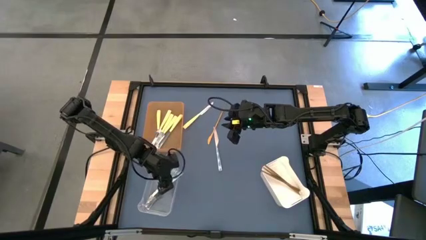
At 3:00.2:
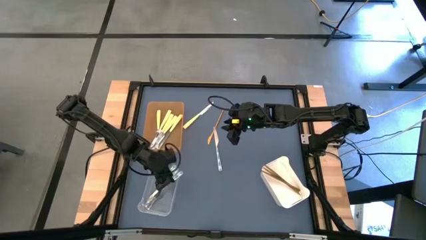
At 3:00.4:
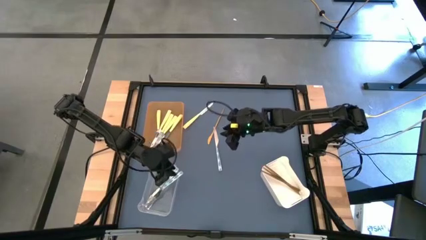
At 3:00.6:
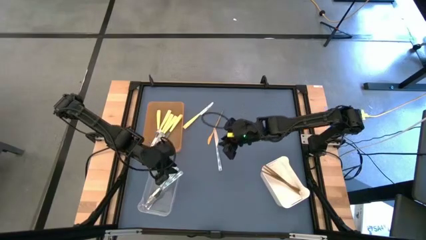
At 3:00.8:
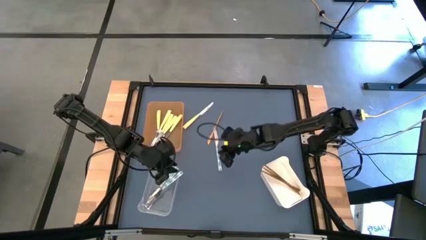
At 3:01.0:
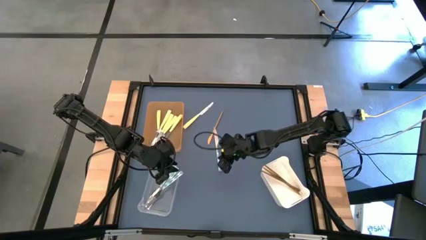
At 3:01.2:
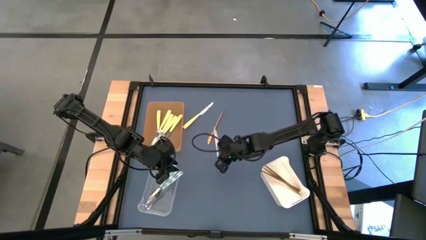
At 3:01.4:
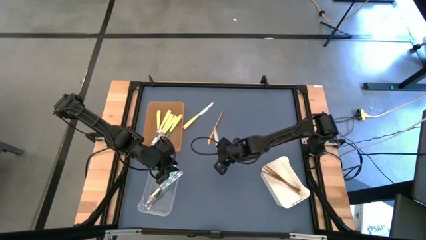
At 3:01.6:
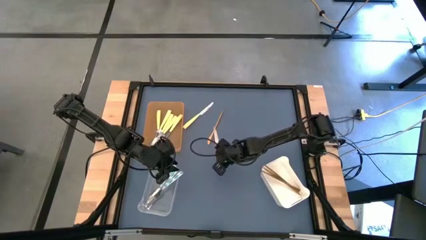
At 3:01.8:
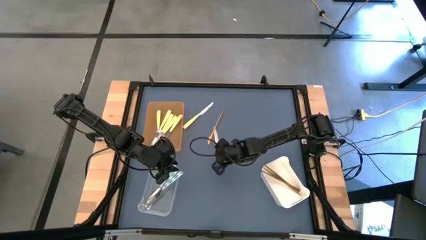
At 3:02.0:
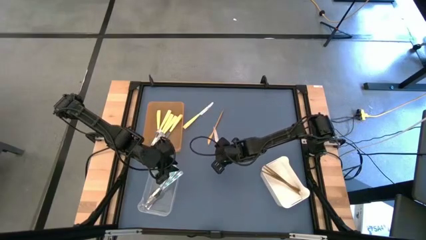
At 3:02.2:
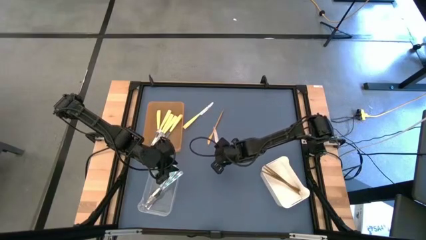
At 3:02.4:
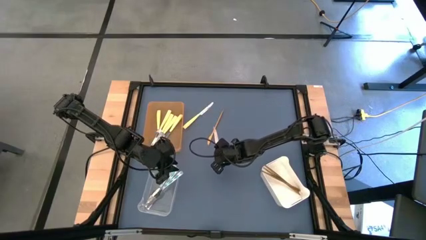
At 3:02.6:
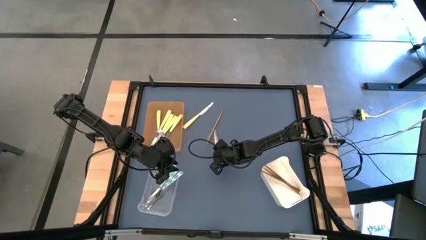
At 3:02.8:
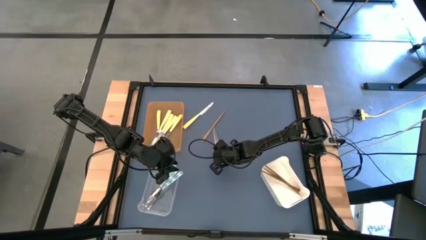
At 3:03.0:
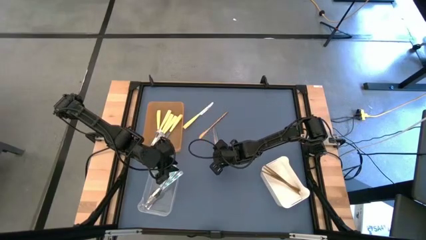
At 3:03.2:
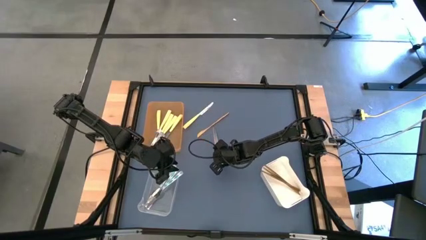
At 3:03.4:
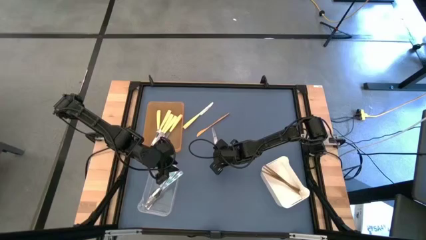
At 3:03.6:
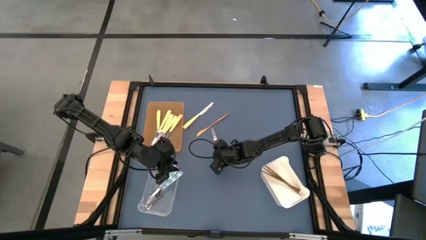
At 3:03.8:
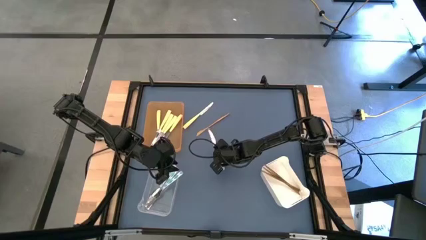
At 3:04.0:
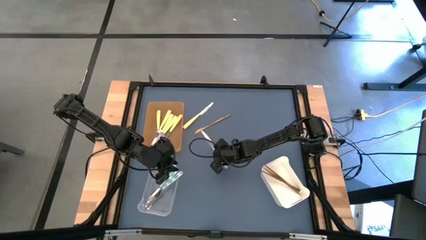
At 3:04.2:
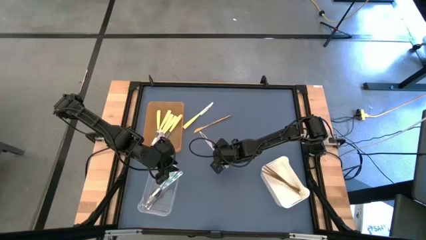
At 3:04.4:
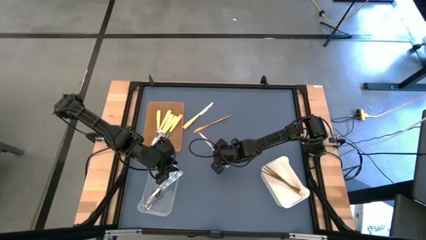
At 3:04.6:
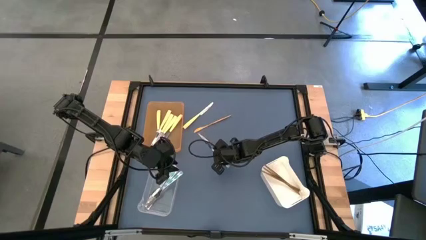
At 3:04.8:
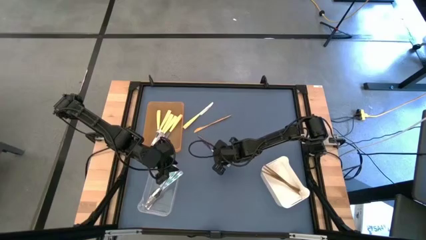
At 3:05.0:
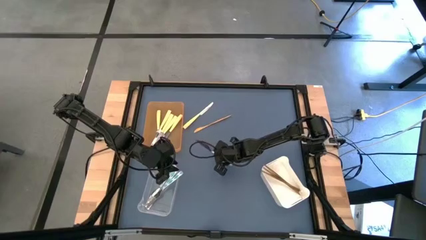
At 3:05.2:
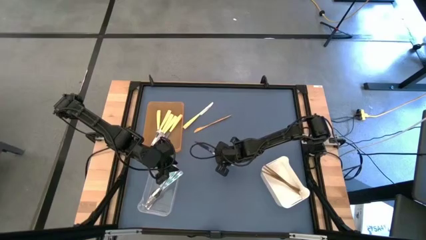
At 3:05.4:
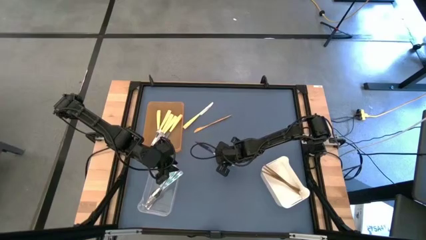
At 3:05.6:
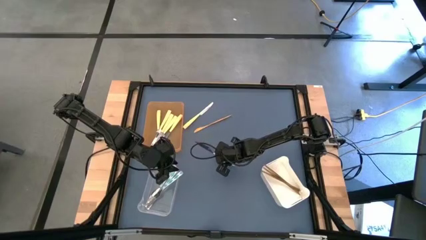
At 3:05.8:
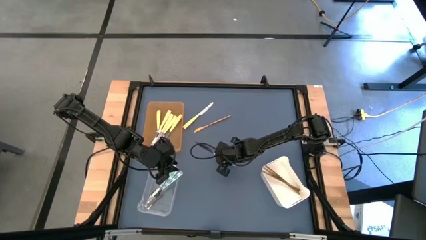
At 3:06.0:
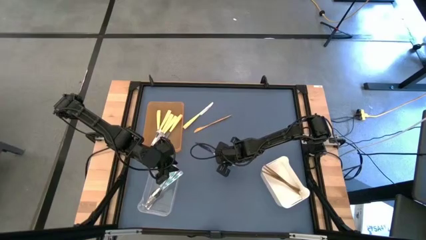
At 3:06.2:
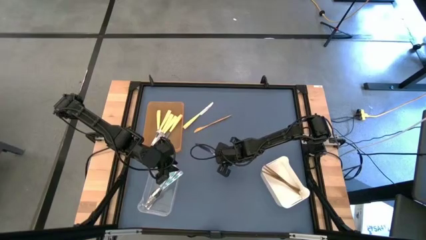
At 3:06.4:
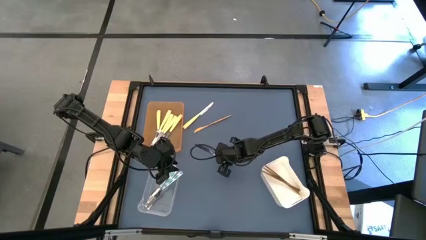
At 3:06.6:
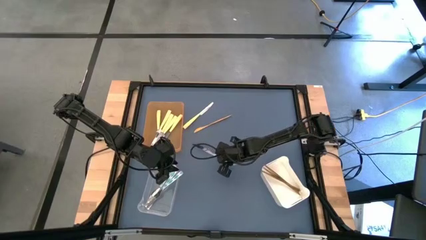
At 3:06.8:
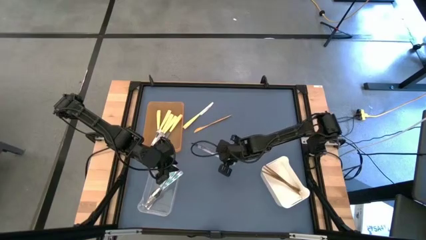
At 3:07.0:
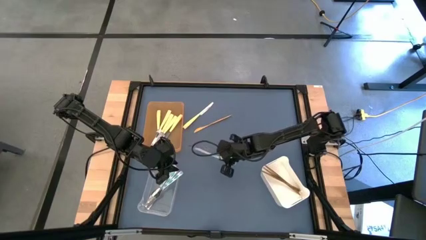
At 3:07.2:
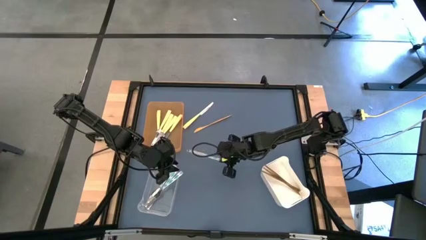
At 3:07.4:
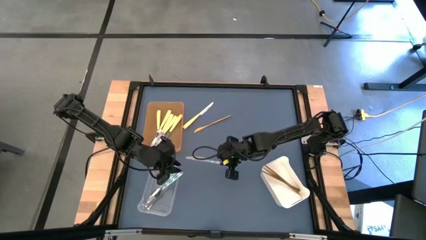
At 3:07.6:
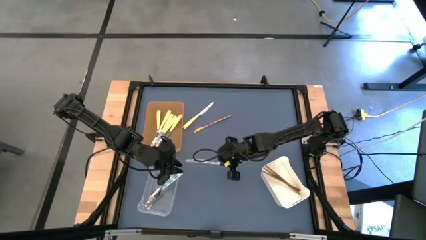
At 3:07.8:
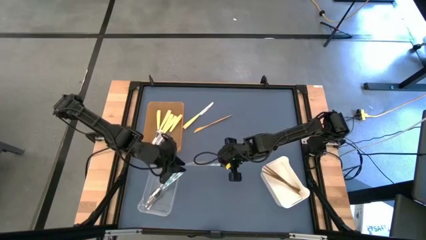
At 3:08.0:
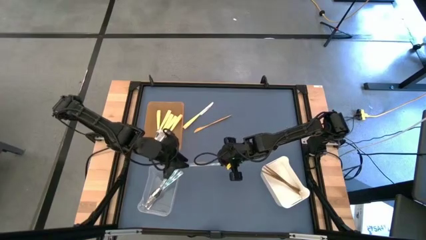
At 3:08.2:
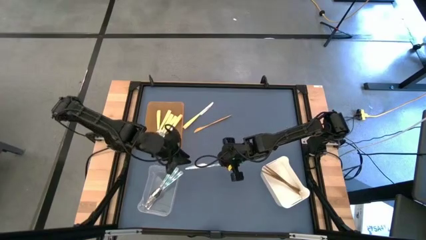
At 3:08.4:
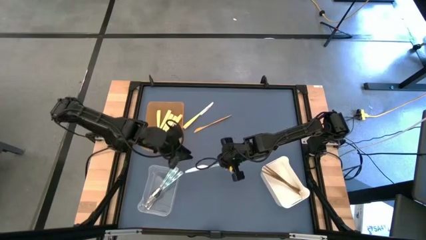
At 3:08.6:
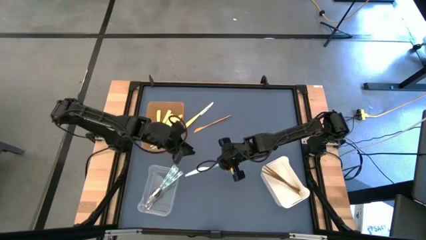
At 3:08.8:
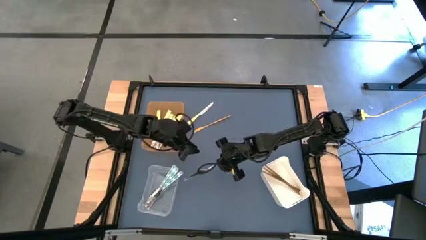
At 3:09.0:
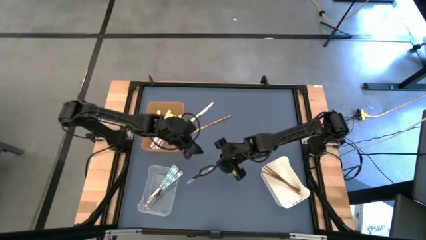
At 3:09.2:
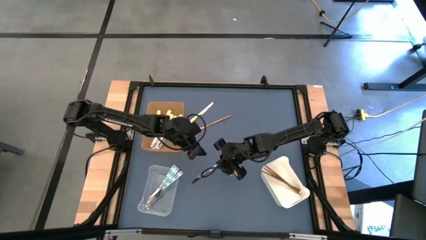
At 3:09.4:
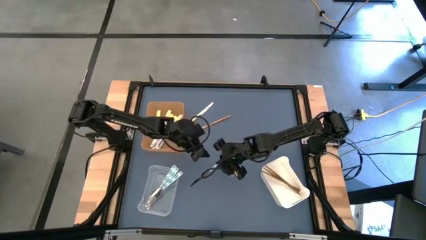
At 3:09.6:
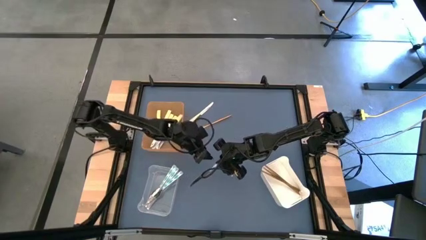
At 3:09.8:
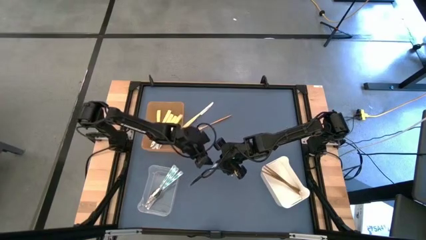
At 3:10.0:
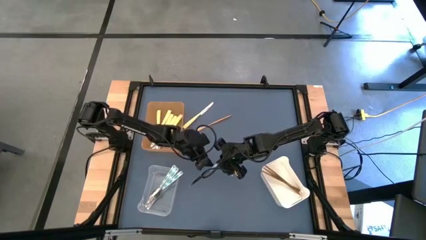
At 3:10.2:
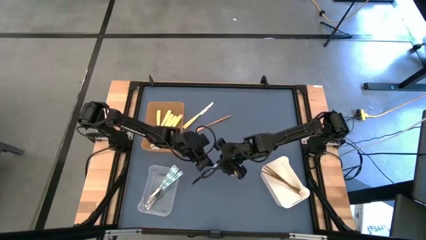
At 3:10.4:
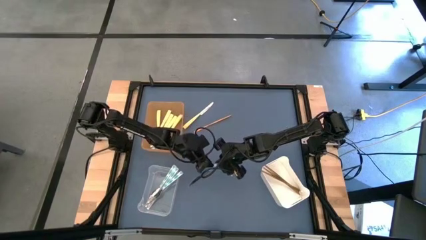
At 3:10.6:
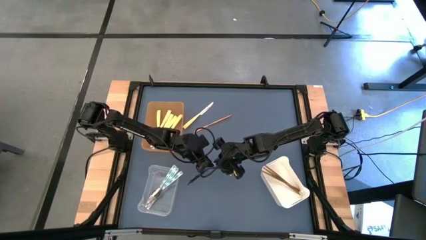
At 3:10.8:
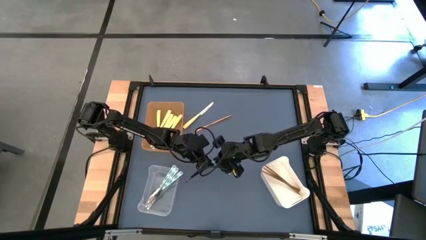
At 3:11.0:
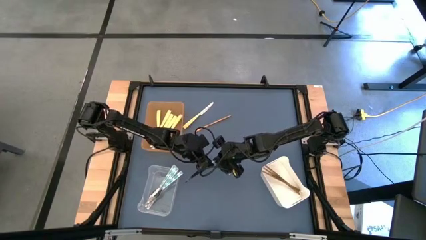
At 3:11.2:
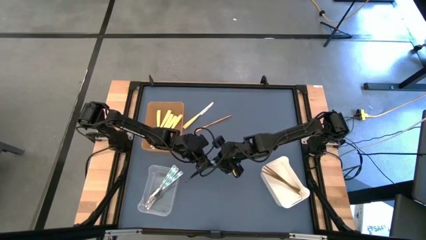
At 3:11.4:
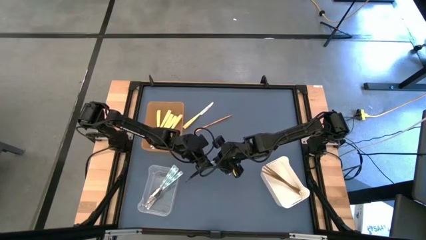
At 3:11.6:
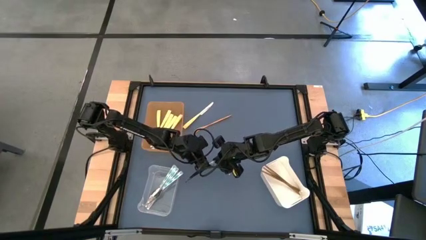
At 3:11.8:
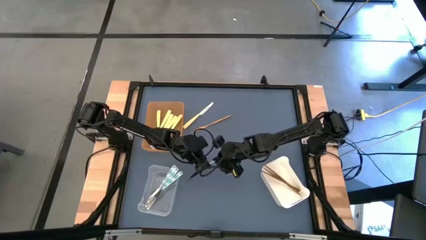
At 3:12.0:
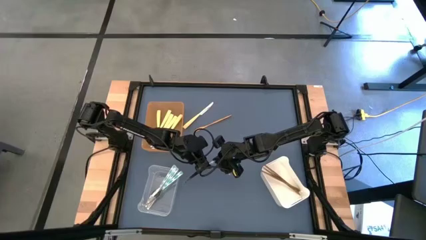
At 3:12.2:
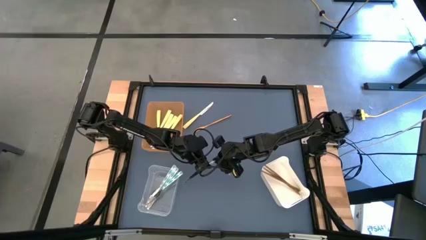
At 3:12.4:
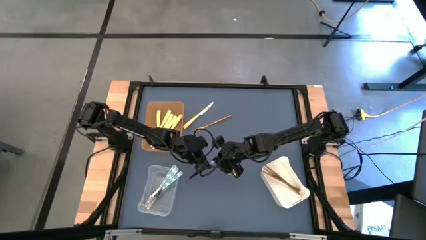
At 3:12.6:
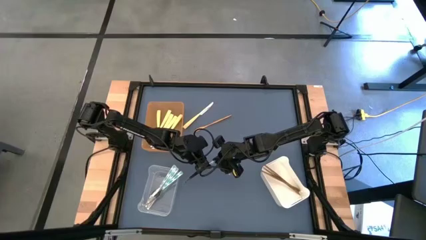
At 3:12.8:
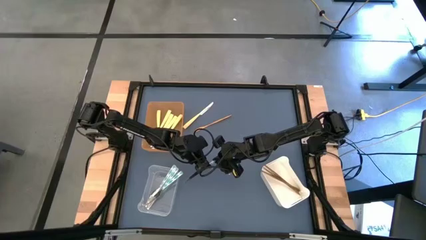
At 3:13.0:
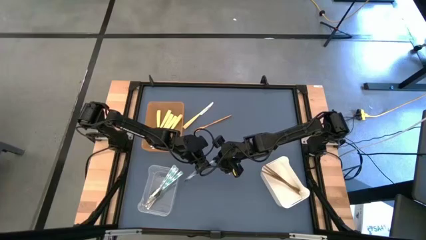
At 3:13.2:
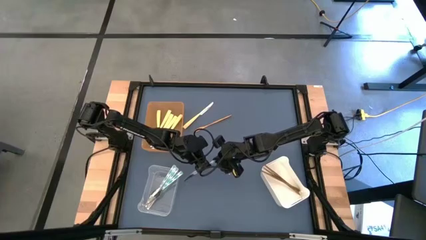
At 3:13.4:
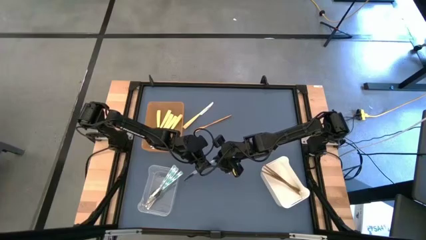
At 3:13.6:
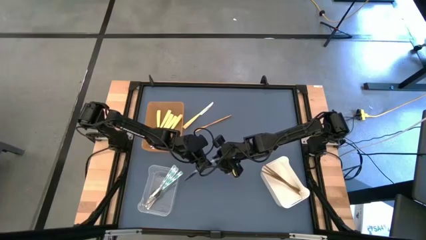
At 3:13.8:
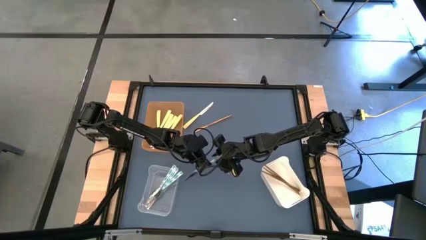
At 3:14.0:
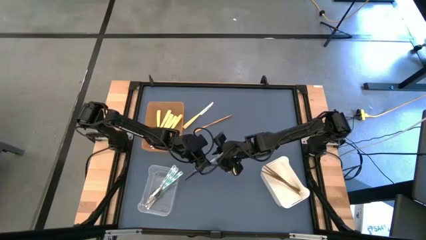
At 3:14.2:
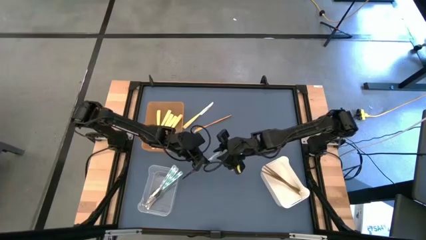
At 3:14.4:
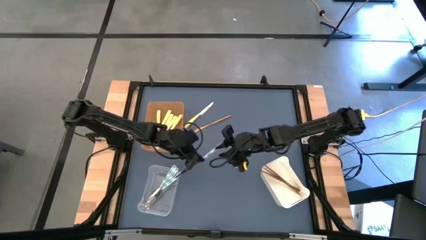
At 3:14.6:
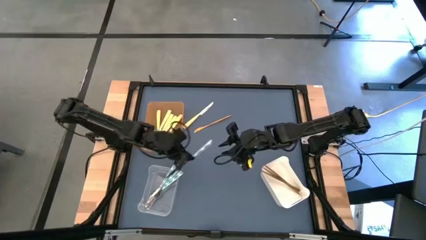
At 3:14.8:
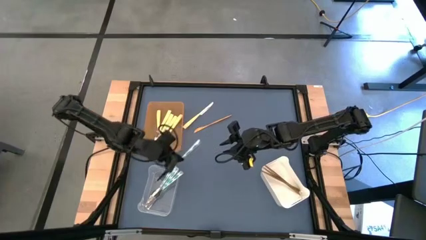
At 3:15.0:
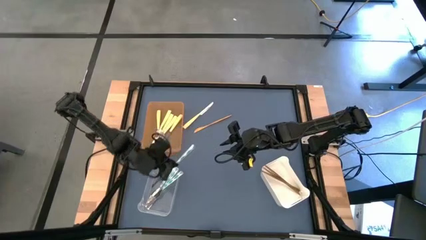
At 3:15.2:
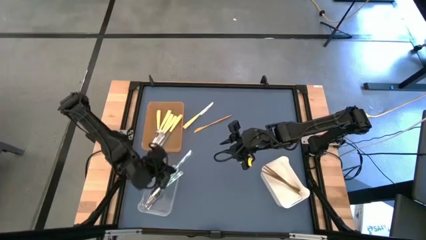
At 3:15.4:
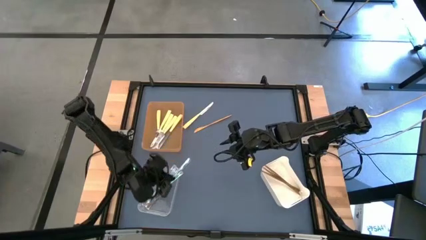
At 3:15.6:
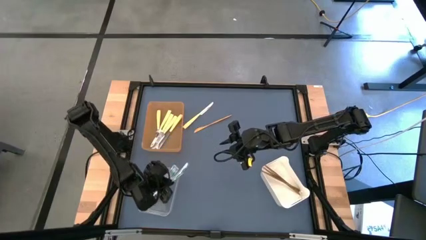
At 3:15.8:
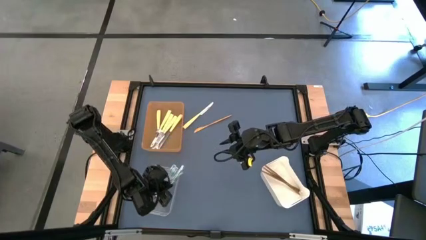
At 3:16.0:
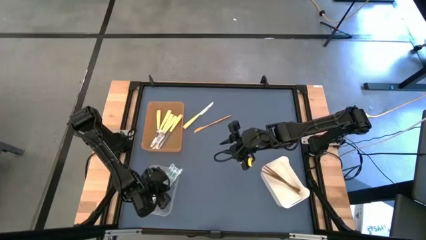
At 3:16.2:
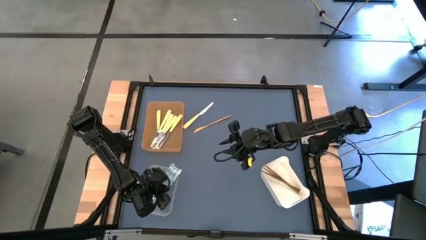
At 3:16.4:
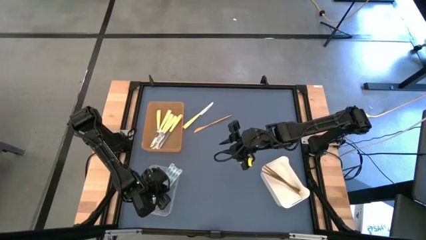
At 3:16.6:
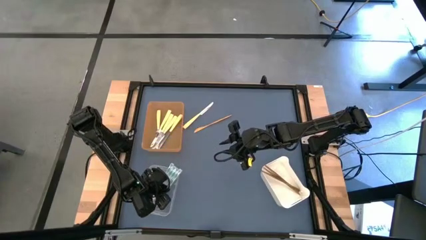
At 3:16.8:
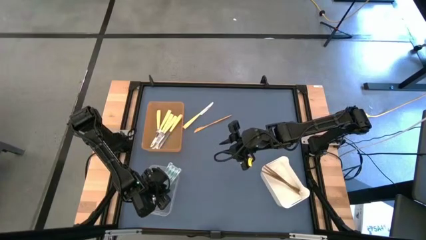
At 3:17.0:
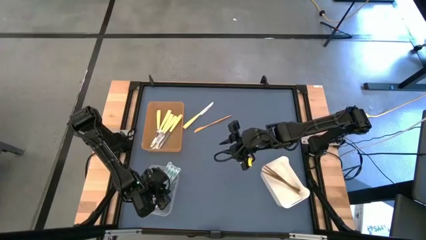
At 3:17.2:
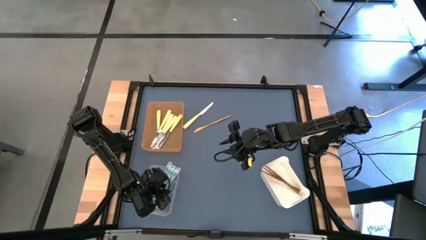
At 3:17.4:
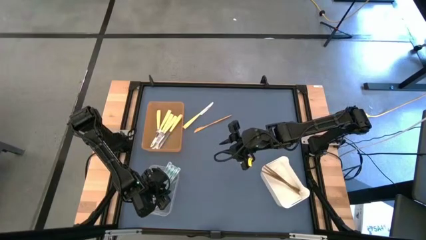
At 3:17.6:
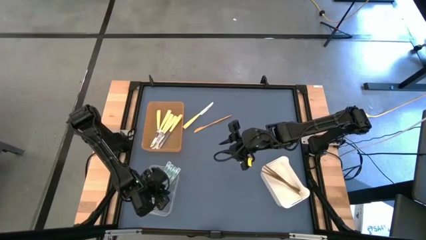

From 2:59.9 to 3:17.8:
Task: Sort silverware by color (type)
Put the green knife into the transparent bin
